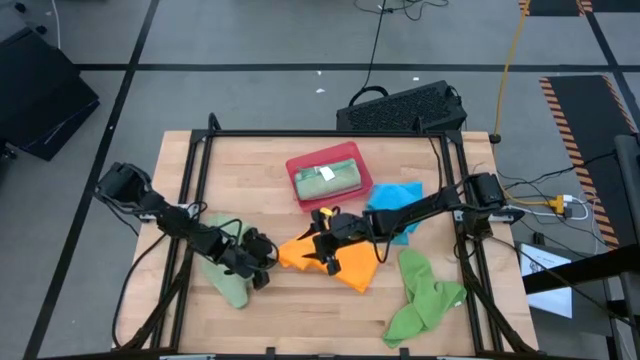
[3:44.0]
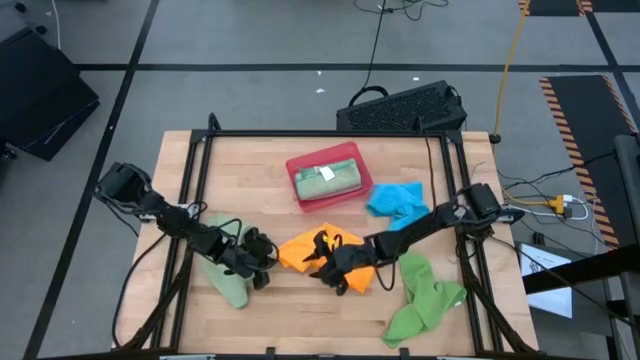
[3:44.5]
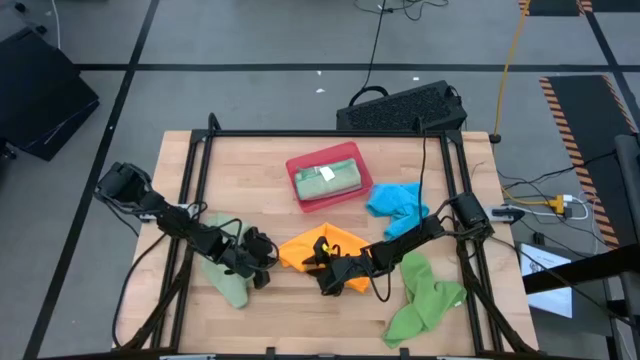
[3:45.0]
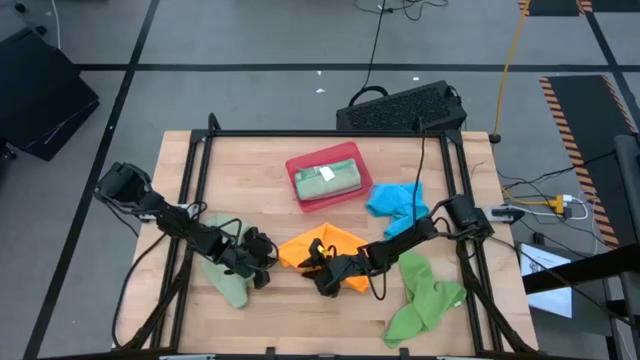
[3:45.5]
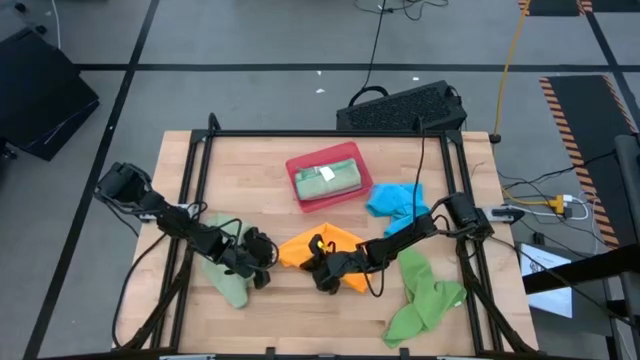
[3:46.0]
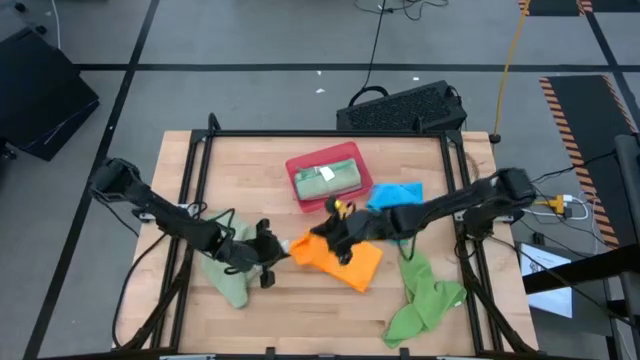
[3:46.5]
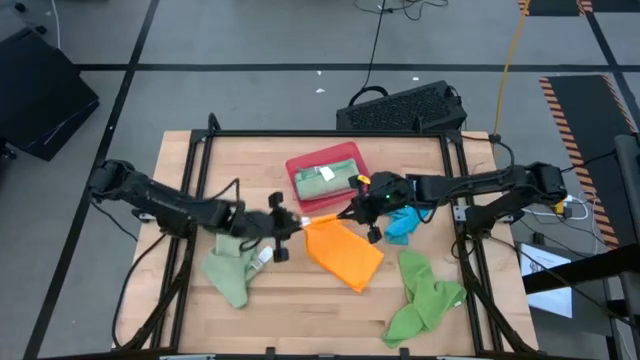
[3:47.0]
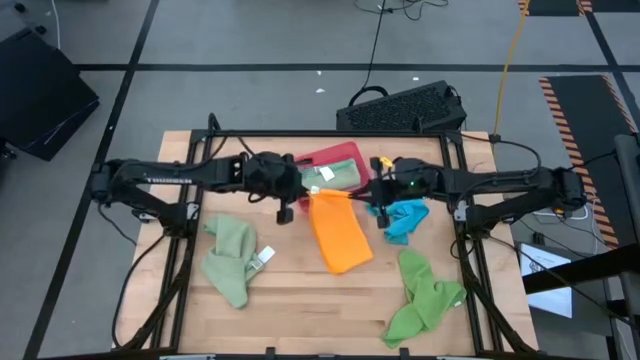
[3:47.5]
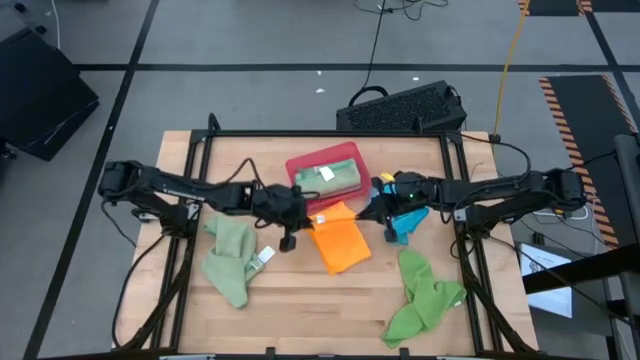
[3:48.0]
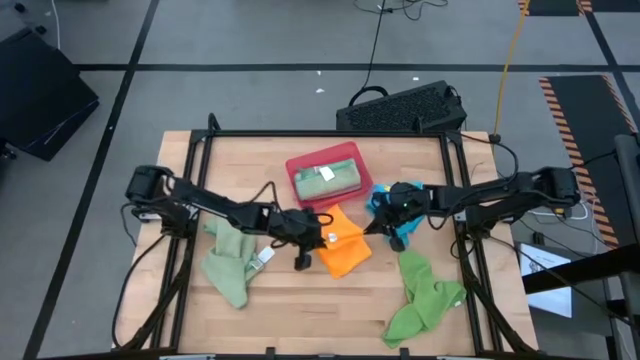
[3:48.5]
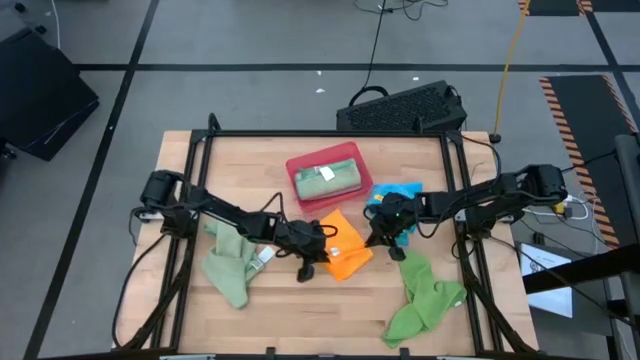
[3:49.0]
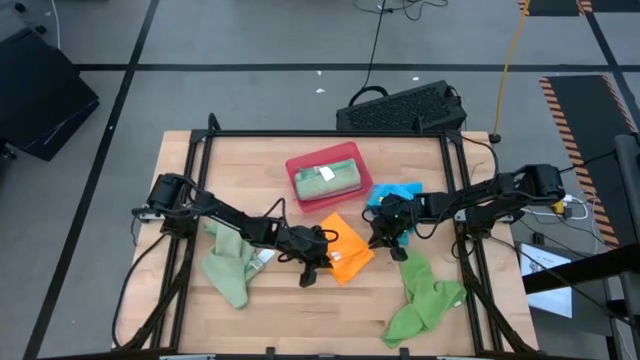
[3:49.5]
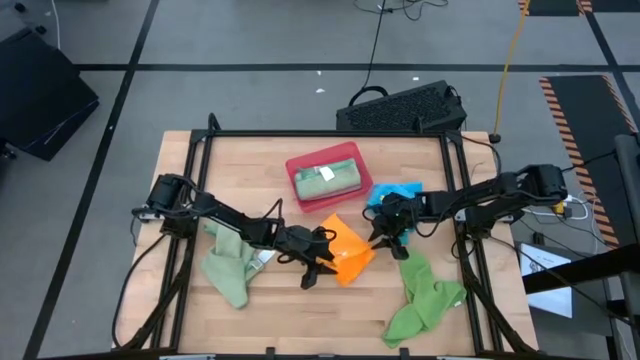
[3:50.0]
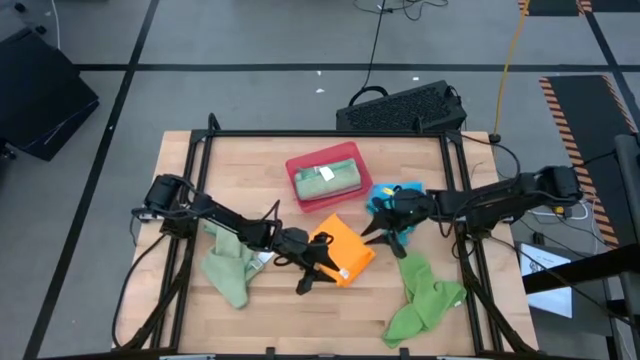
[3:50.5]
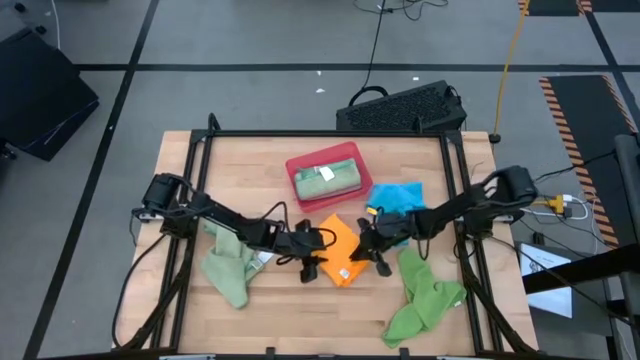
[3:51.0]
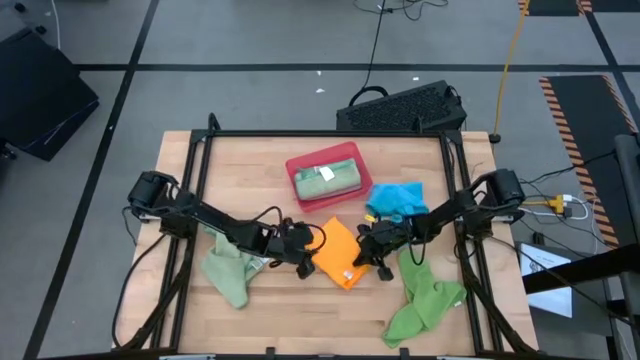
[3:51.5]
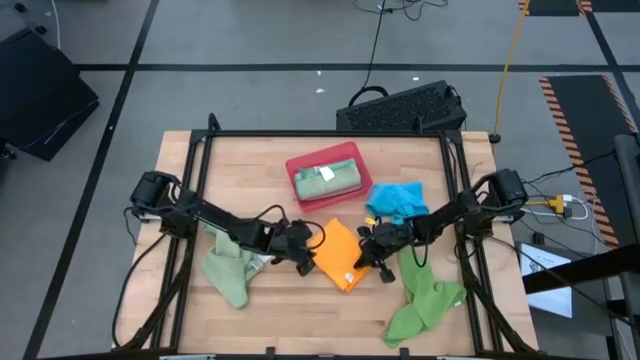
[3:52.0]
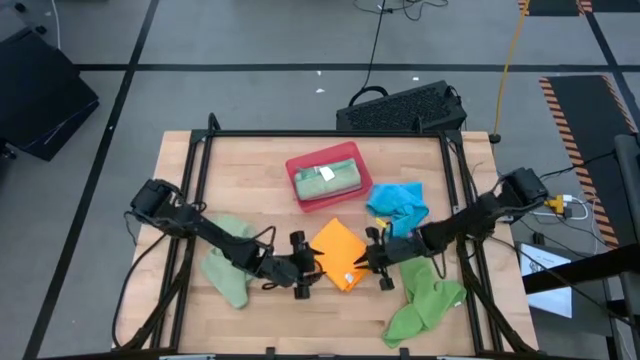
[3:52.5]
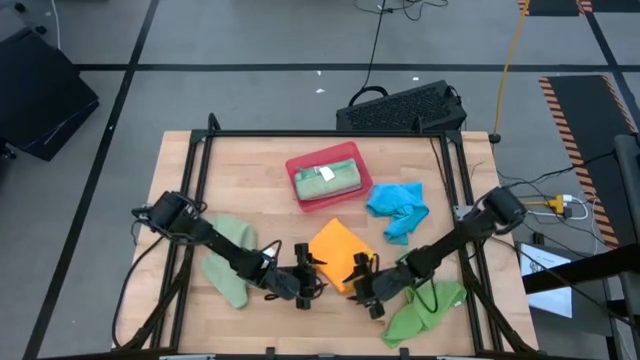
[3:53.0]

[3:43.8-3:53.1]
Task: Fold microfiber towels
Fold the yellow microfiber cloth

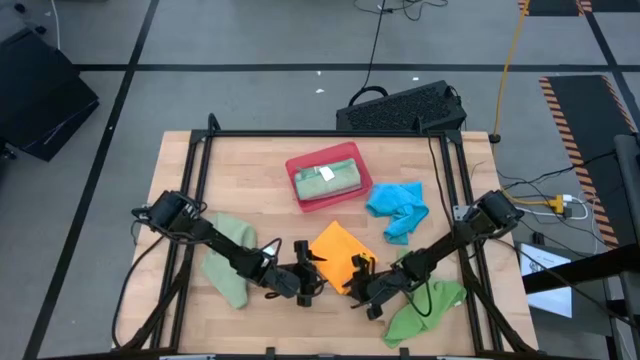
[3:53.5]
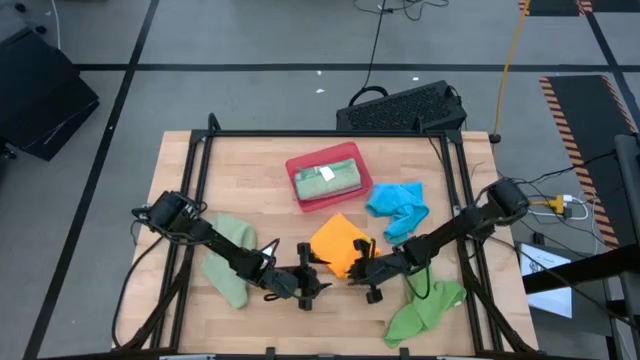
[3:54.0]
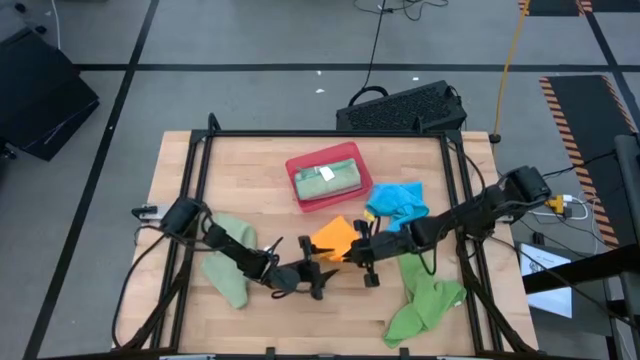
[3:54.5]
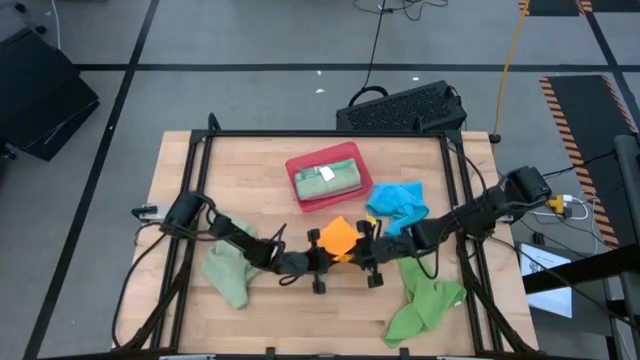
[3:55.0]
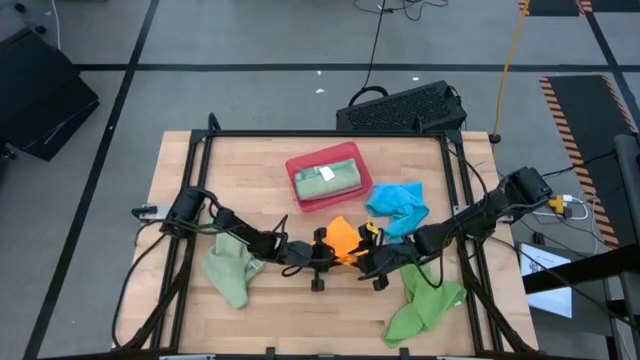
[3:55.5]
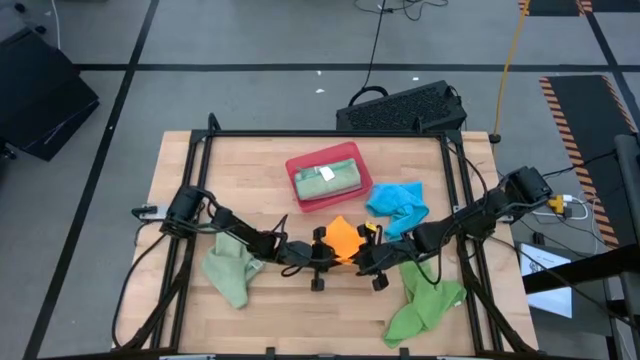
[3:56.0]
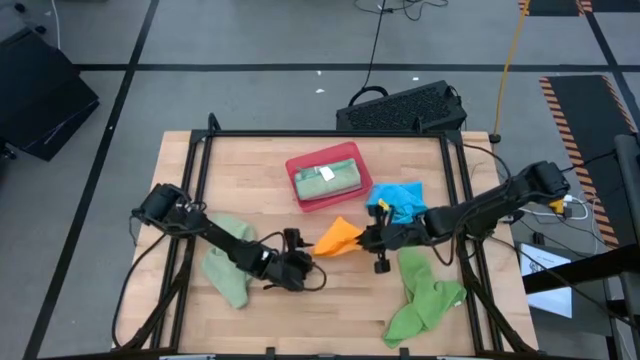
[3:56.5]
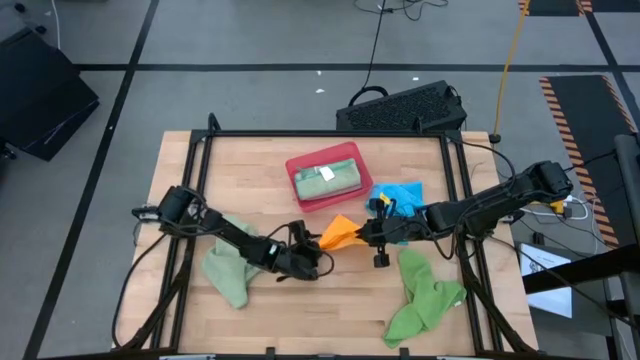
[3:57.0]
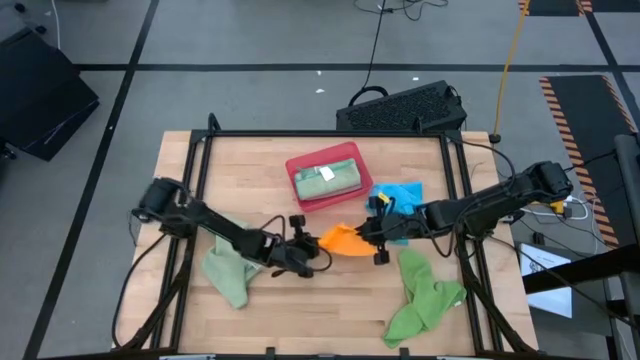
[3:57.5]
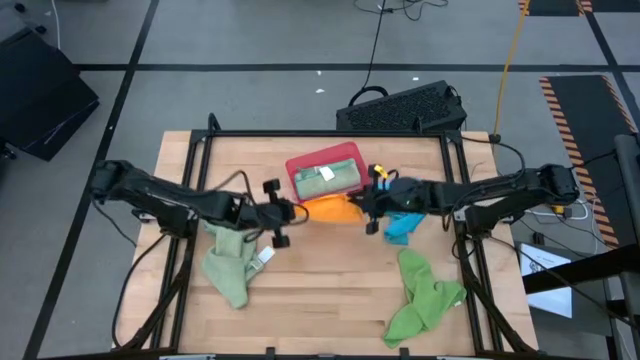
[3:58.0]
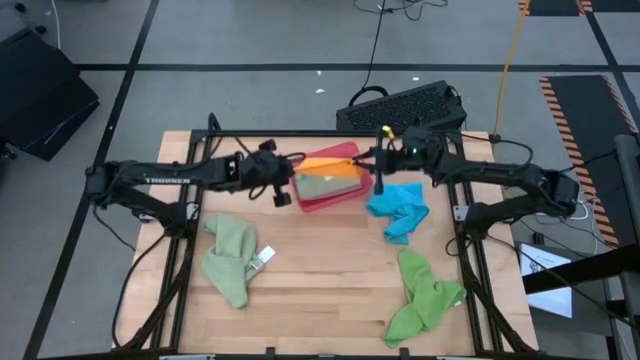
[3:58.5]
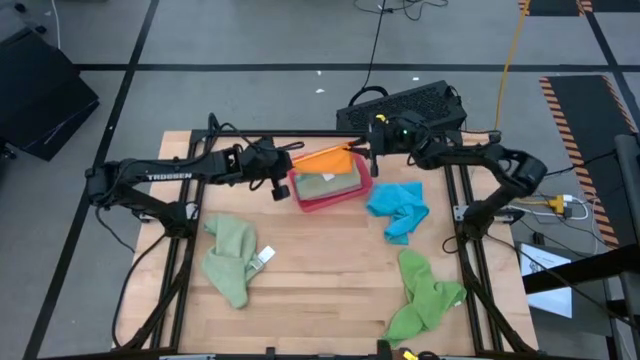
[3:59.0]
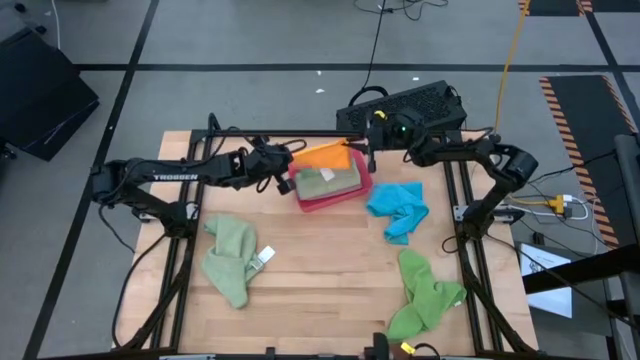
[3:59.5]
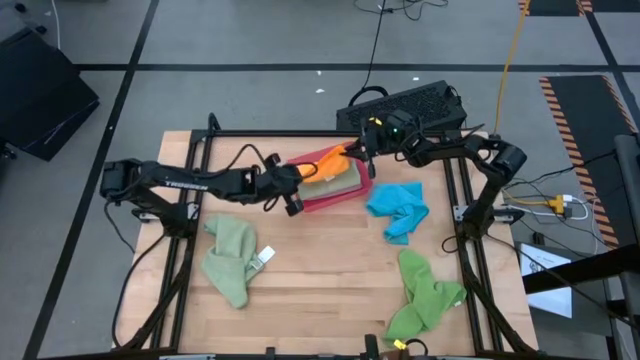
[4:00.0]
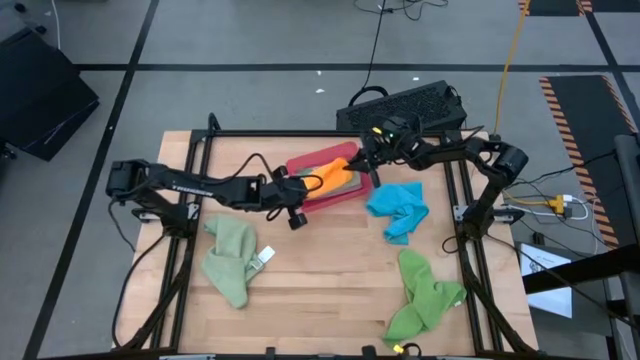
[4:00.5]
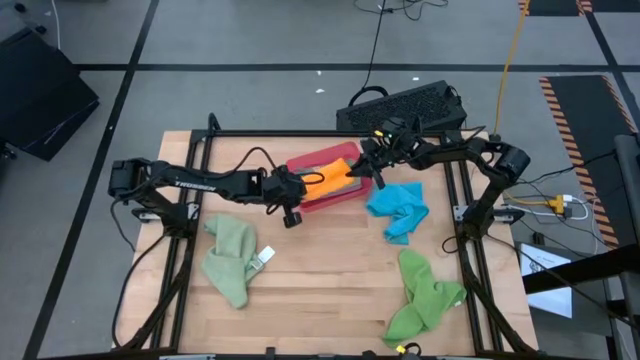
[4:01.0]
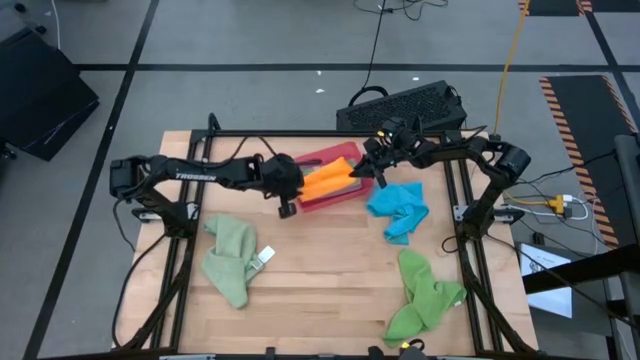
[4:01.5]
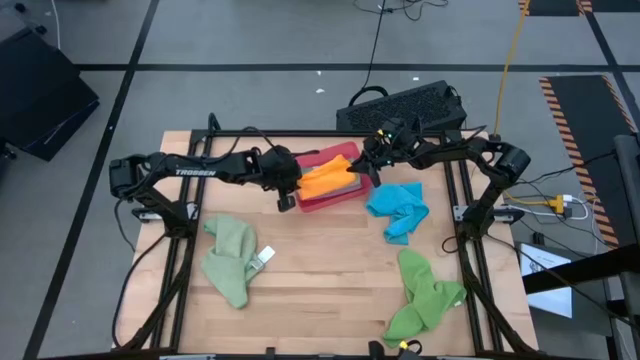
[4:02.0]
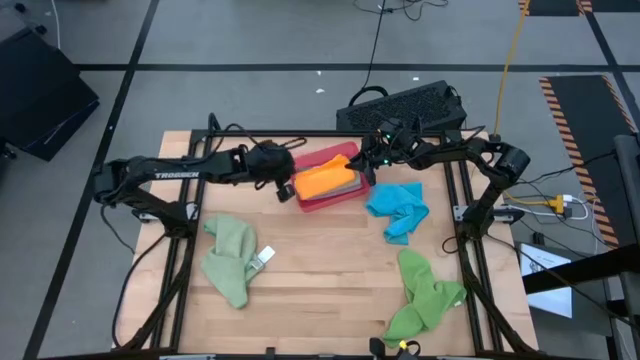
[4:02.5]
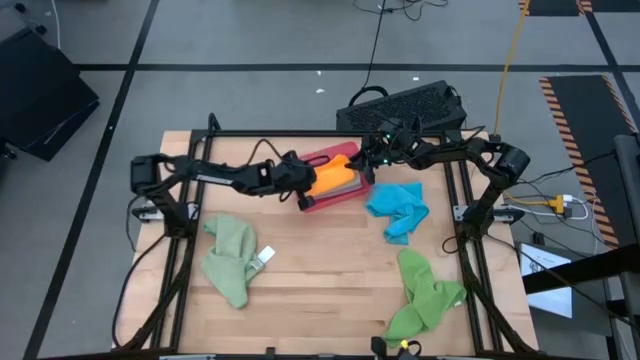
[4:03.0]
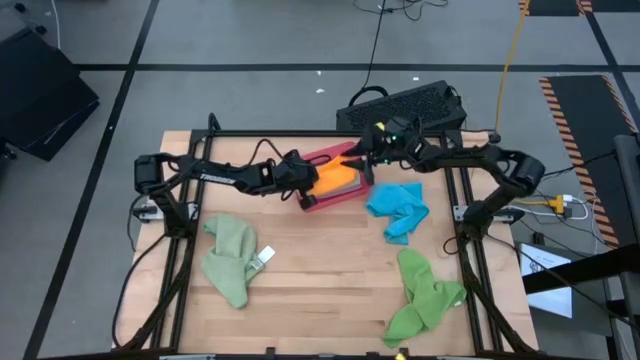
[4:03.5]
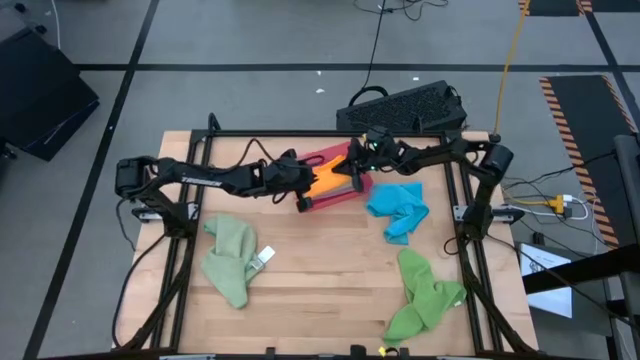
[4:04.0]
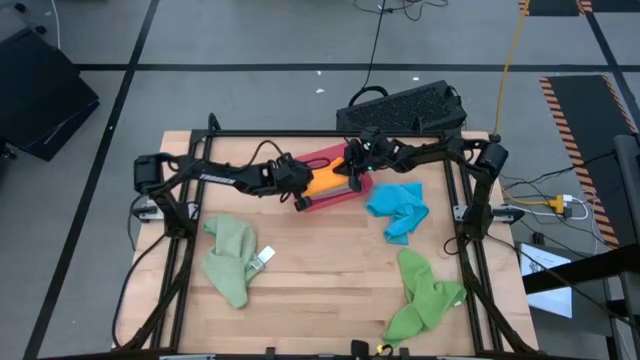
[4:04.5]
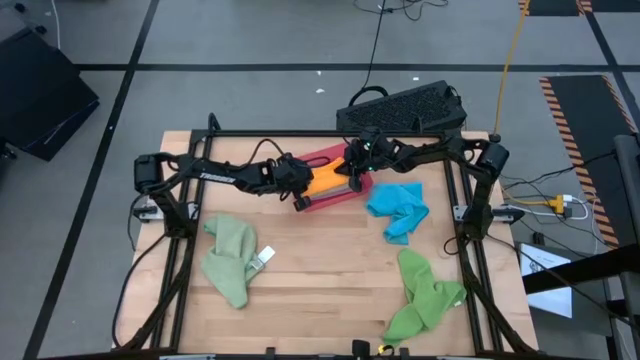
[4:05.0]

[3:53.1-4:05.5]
Put the folded yellow microfiber cloth into the red bin
